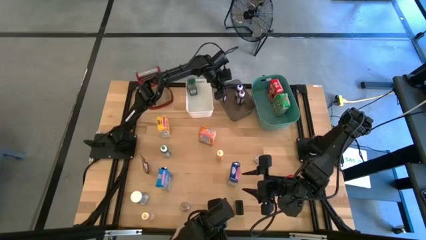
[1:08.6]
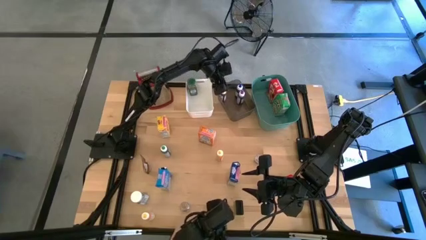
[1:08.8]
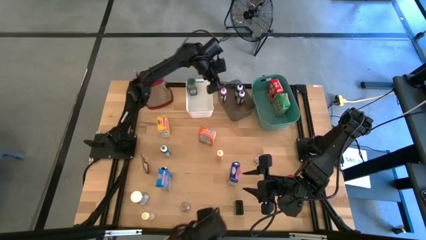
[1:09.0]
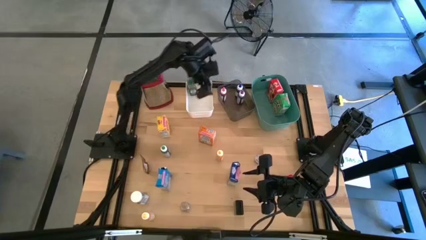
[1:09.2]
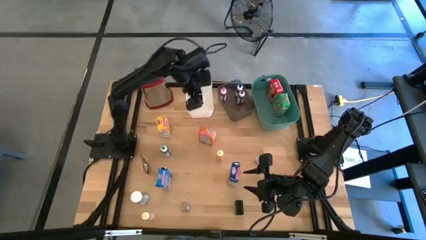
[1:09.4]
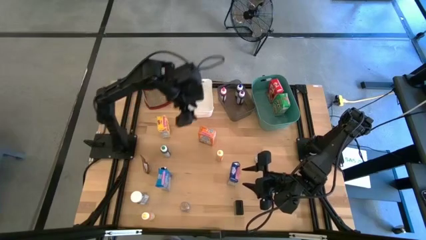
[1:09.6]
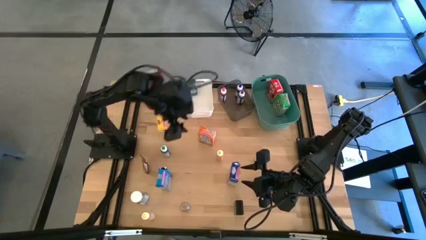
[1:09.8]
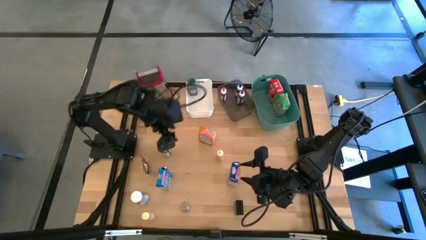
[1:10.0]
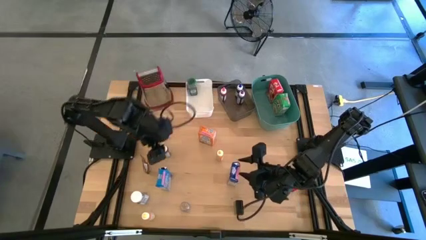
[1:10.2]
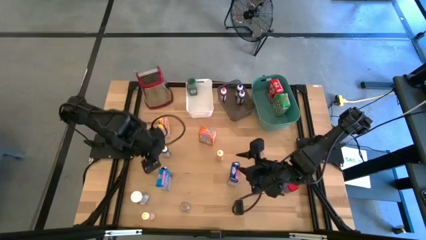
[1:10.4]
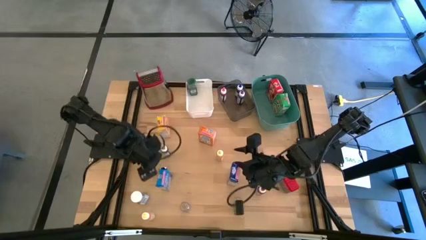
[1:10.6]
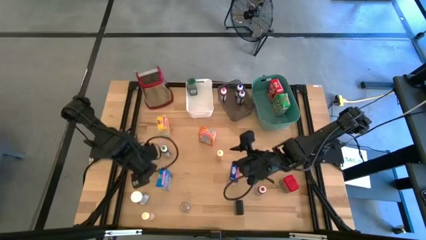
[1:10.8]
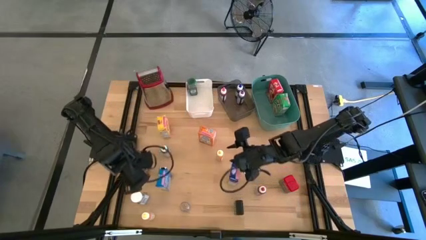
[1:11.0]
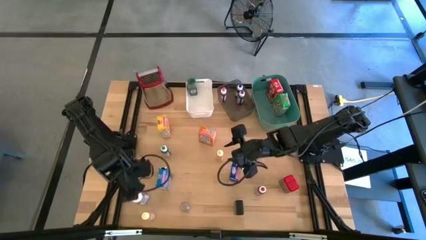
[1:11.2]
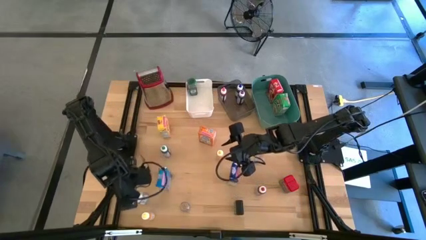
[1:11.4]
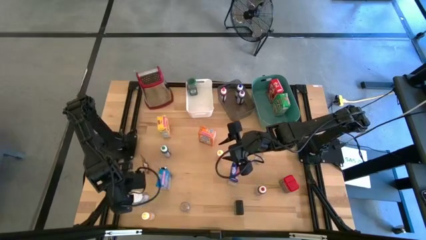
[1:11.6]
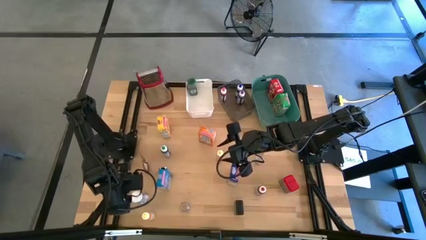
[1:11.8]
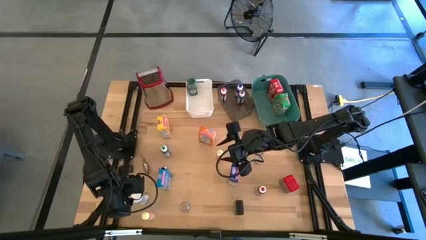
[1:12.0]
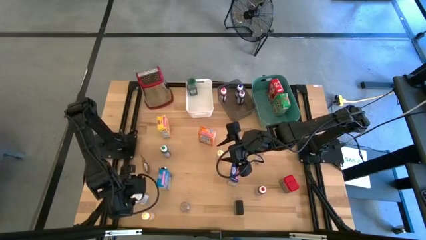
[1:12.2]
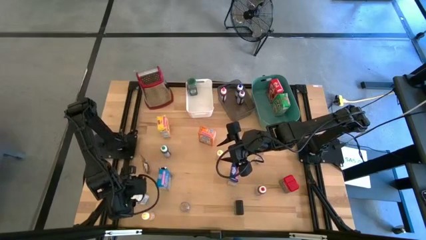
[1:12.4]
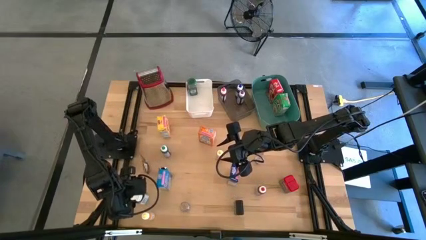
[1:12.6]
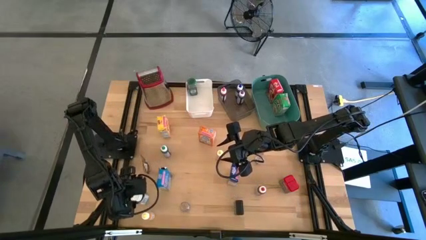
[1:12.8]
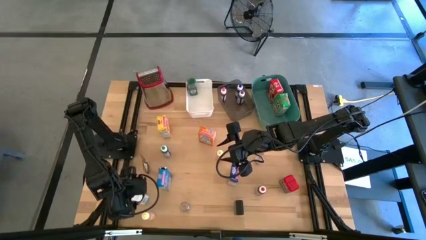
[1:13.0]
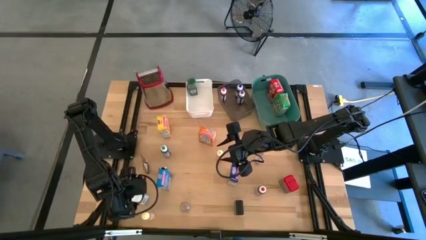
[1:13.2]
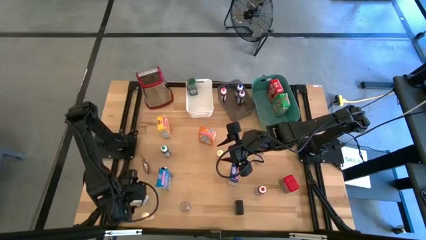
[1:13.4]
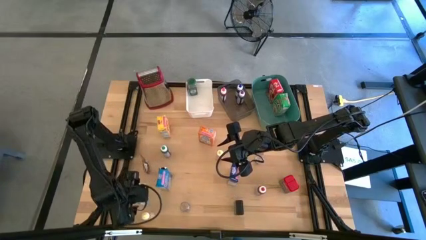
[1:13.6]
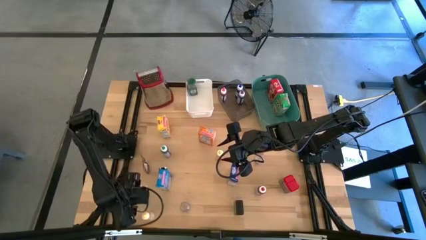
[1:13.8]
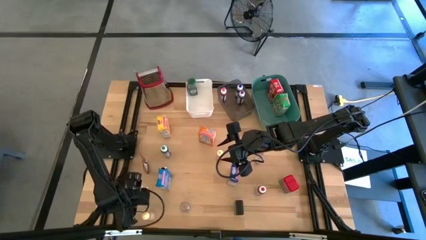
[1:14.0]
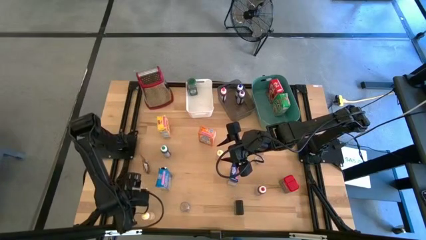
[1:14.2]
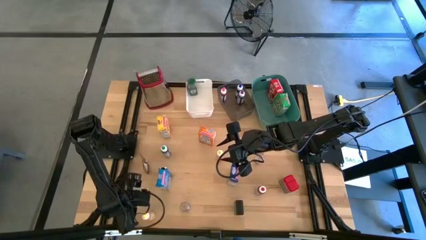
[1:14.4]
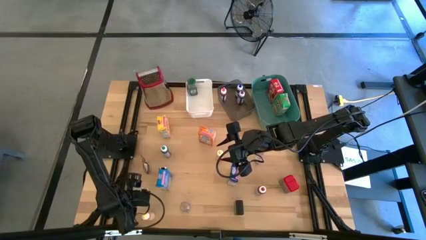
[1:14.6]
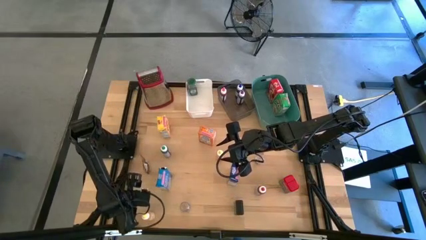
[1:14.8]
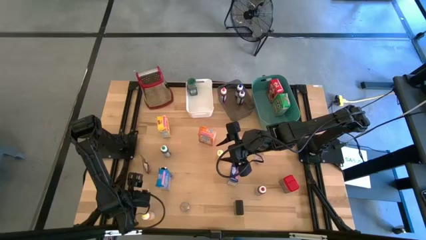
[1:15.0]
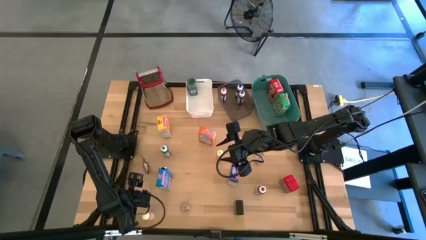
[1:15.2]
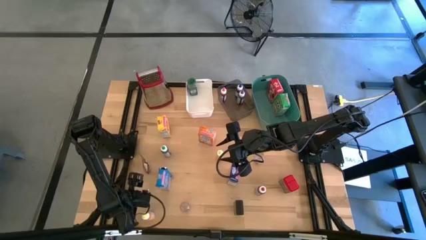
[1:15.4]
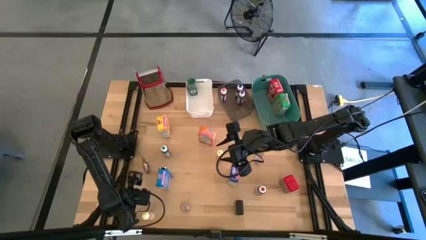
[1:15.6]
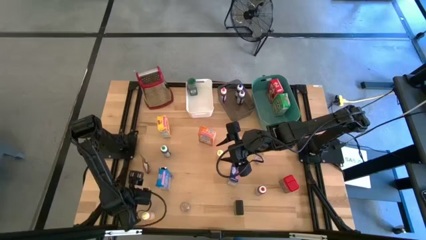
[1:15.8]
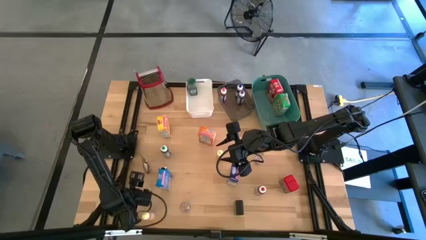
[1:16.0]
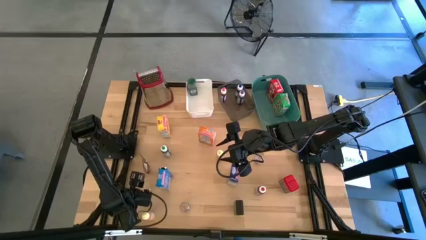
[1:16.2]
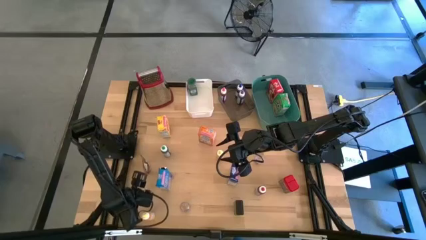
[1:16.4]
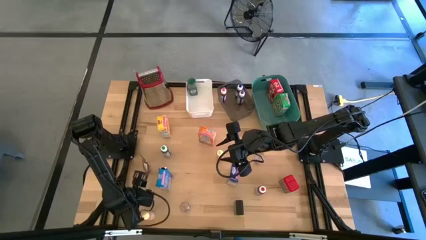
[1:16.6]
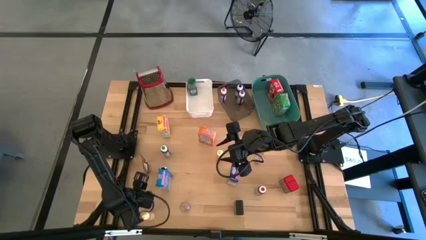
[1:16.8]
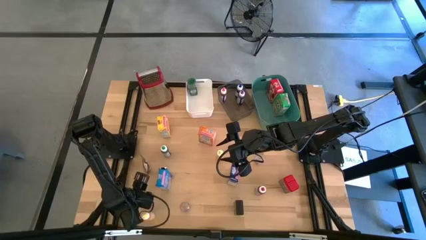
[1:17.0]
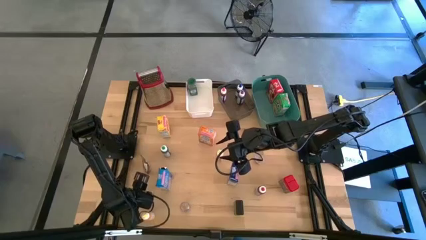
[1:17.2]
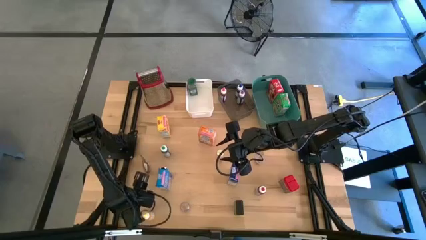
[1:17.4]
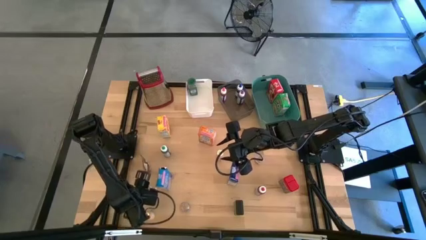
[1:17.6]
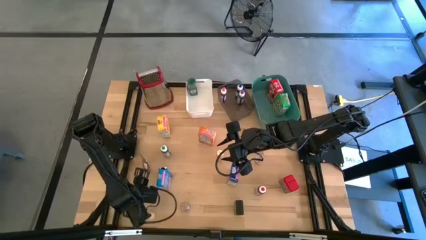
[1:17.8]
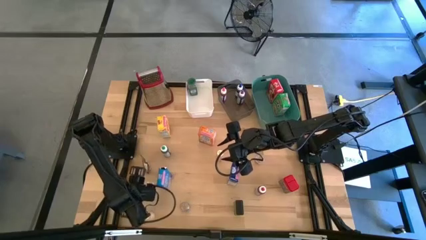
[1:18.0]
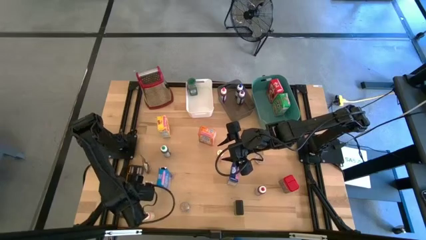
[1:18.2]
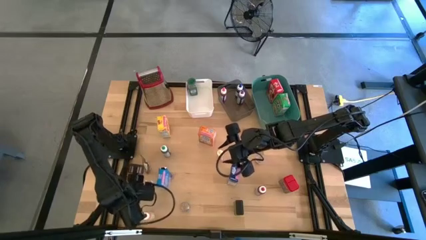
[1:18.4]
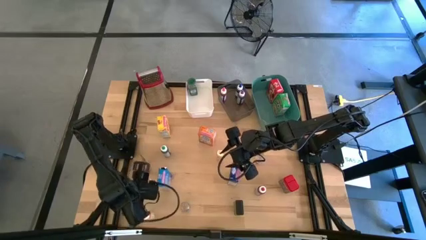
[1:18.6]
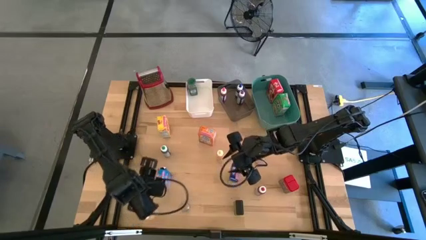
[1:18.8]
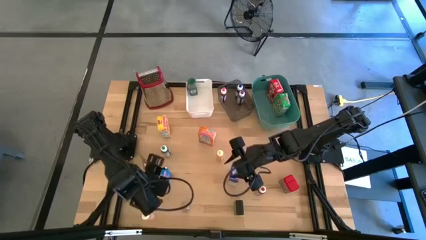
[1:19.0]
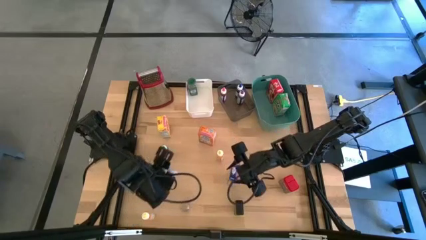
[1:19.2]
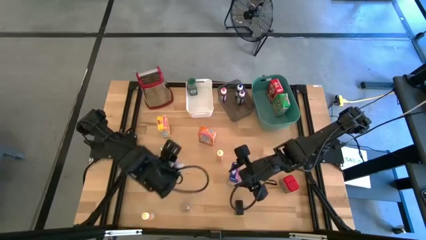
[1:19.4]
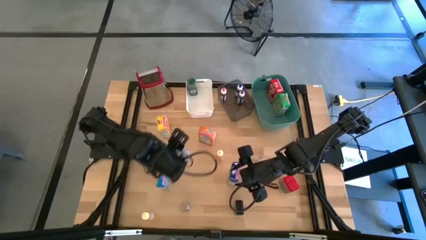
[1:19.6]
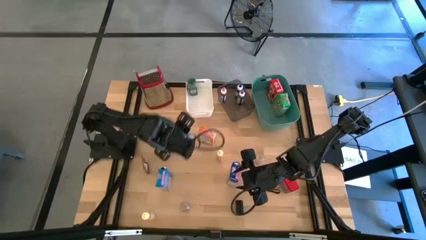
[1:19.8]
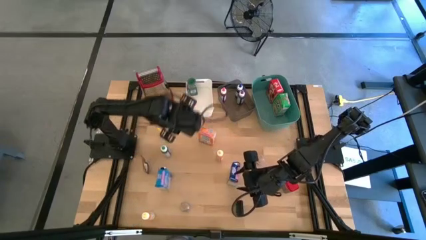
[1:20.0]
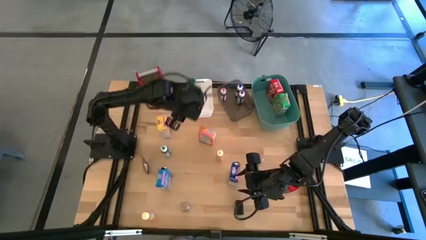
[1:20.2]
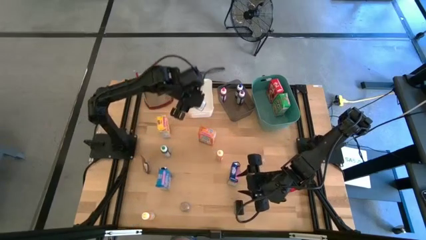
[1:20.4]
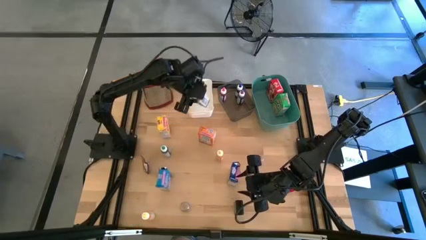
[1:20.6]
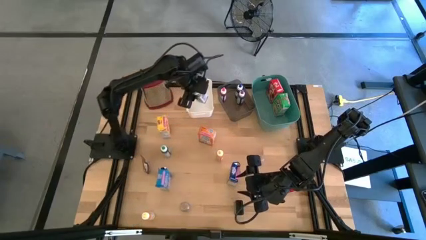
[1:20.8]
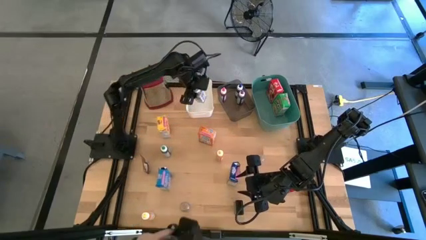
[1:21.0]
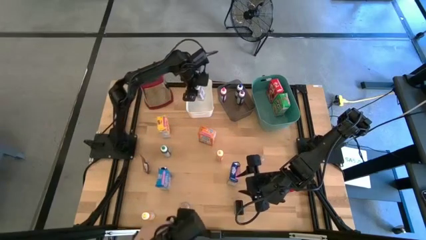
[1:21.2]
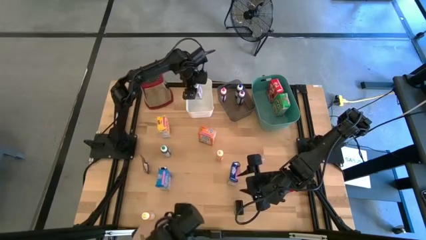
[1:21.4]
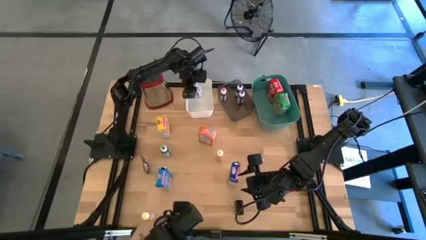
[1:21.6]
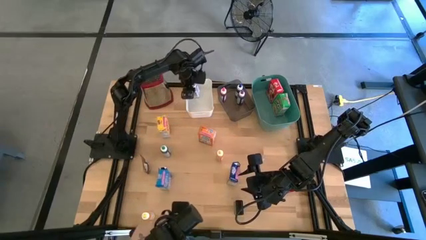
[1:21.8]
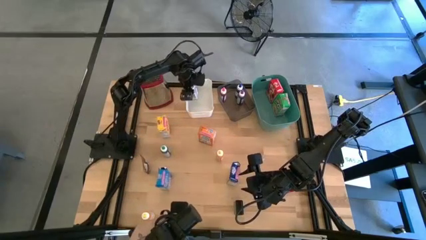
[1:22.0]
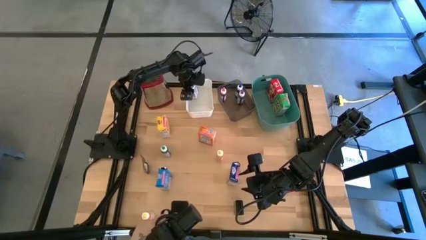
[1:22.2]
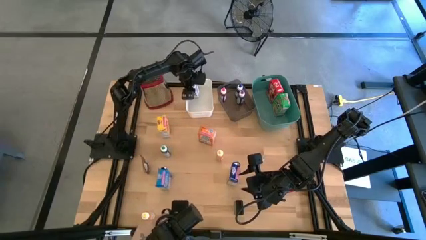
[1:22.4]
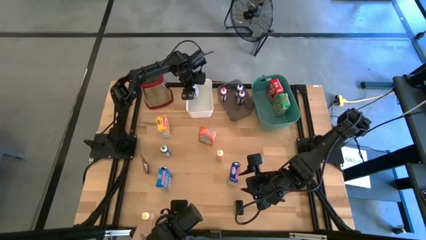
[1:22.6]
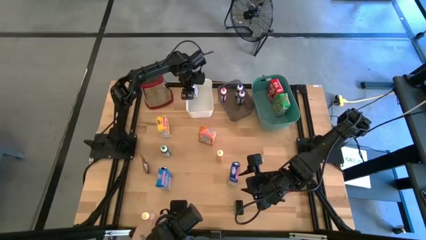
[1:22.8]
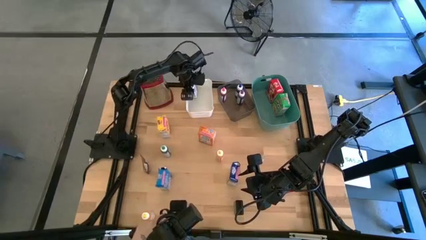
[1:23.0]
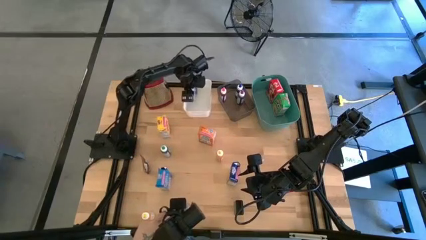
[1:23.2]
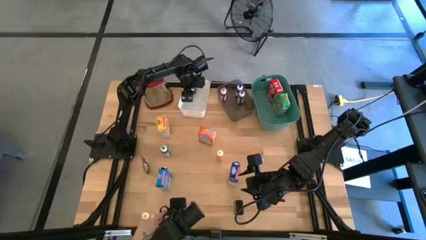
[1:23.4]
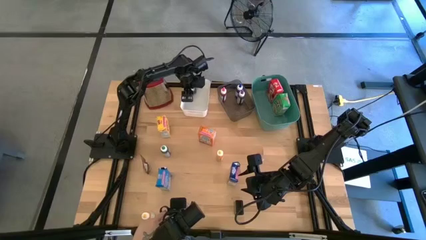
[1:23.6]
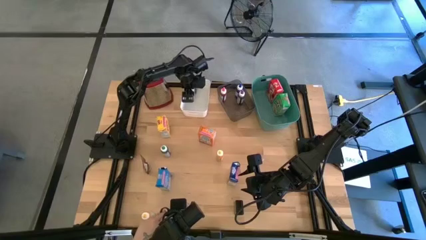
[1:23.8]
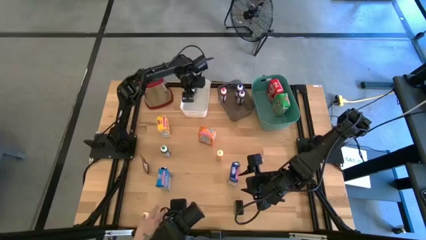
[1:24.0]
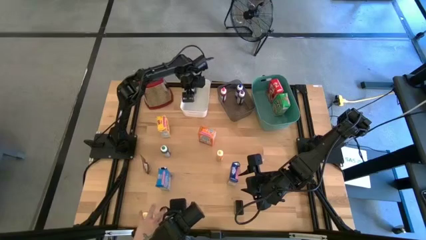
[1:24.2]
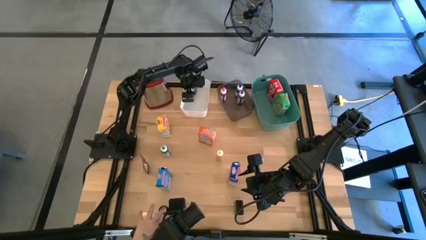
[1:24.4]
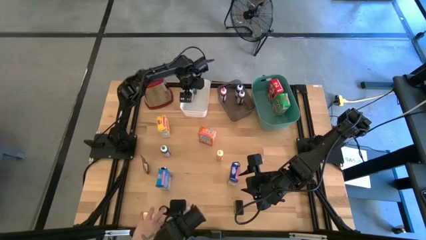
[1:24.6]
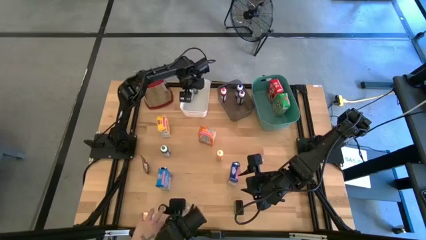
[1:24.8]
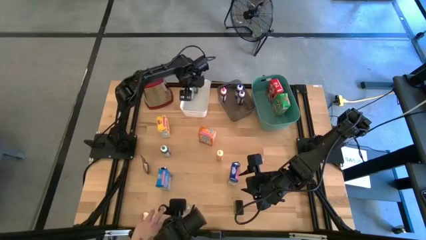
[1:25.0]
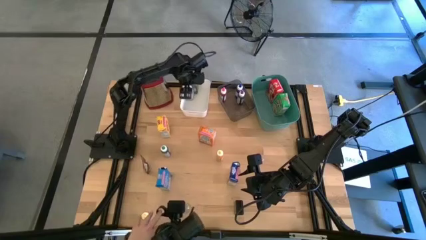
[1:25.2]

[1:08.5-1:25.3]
Task: Pick & Place Kitchen Items
Put the white seasoning bottle into the white bin
